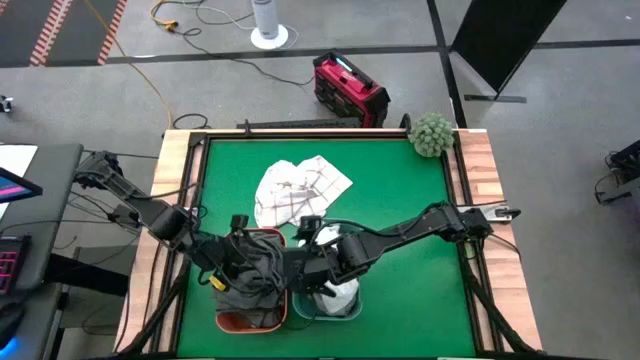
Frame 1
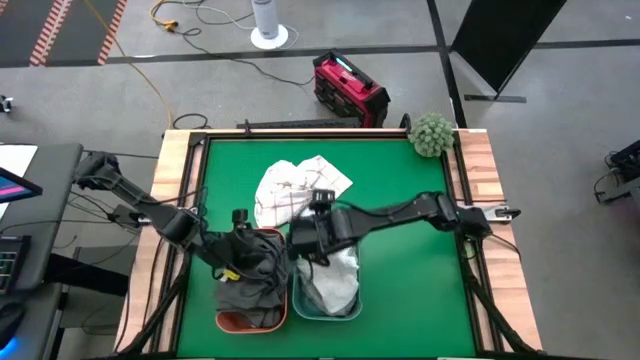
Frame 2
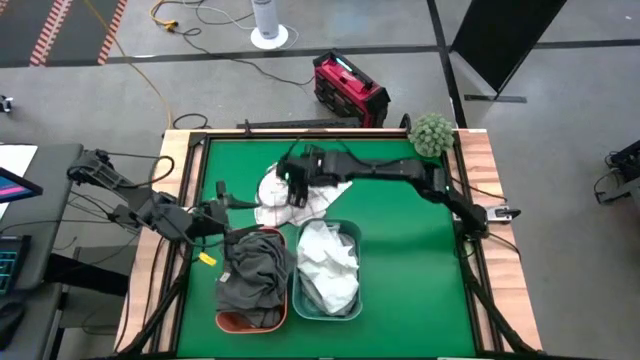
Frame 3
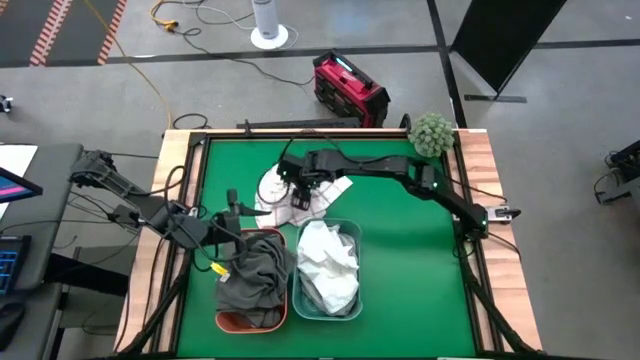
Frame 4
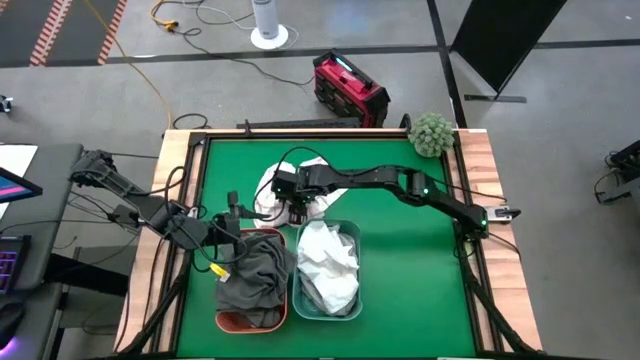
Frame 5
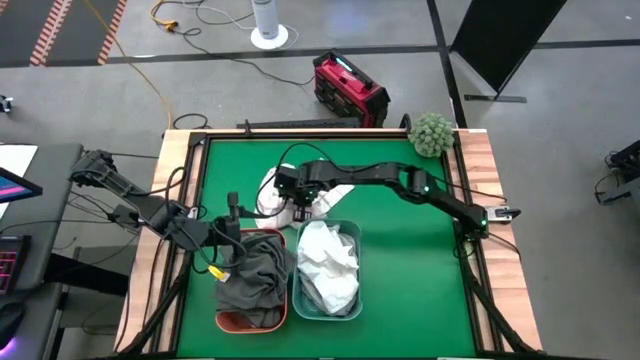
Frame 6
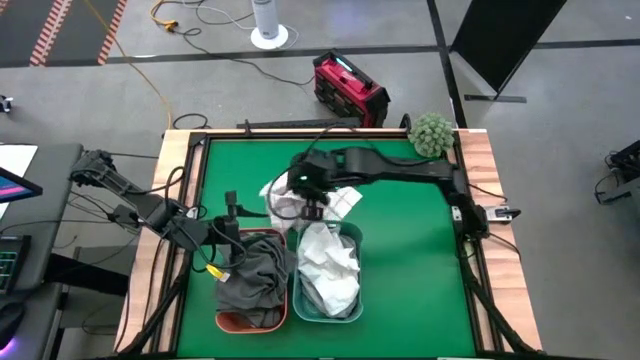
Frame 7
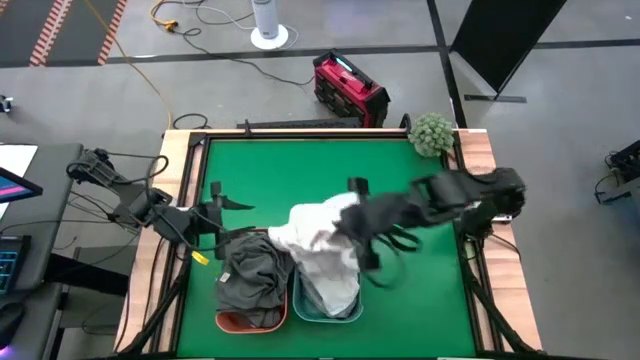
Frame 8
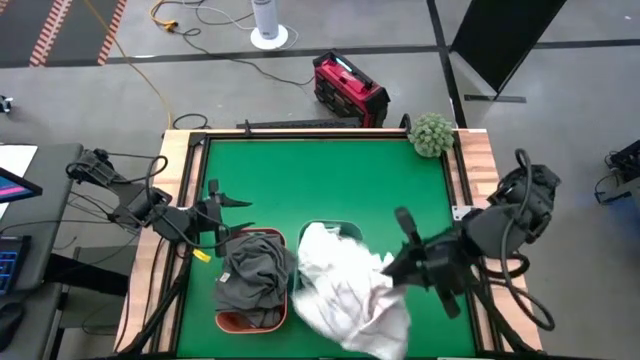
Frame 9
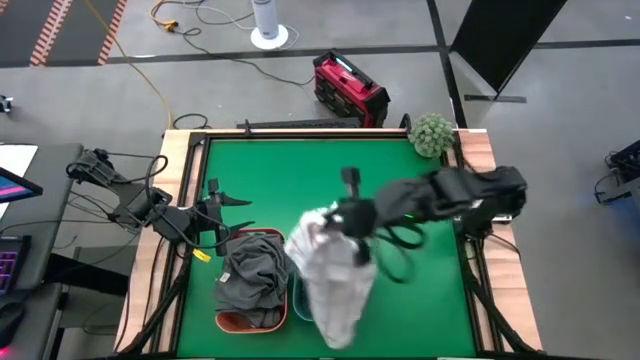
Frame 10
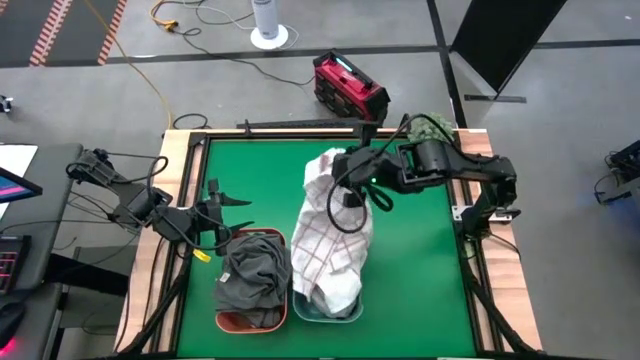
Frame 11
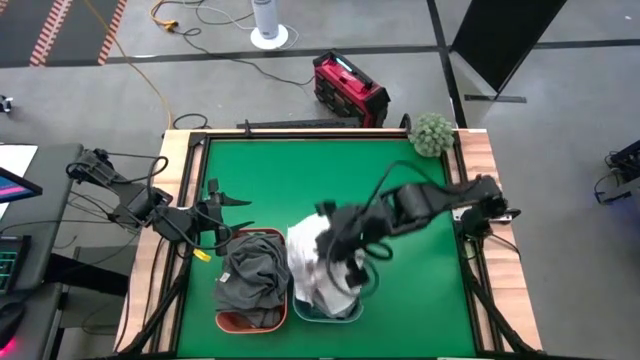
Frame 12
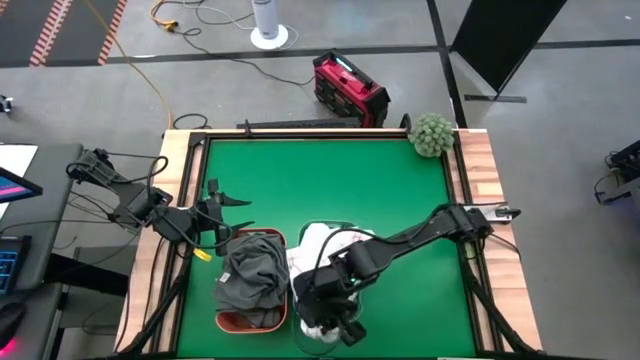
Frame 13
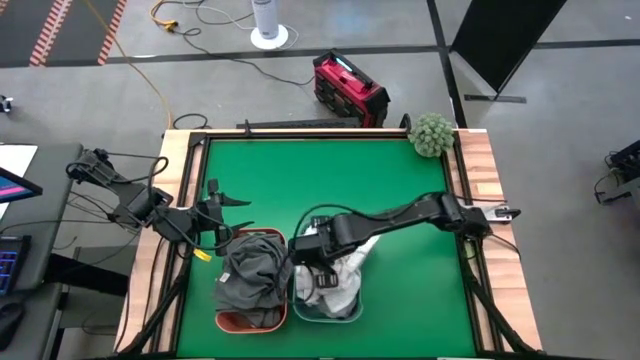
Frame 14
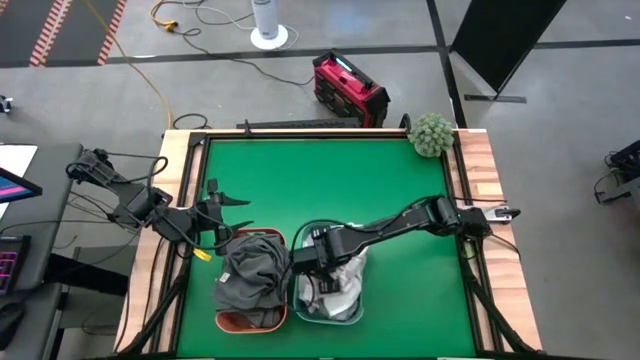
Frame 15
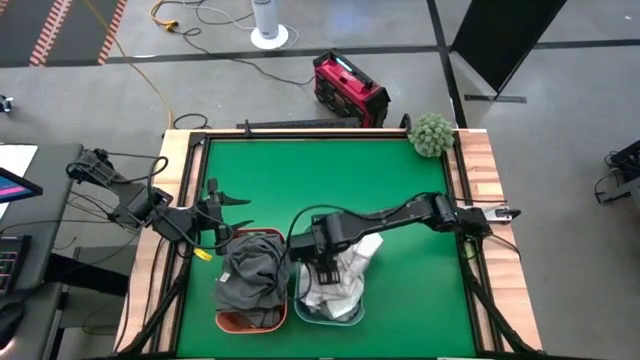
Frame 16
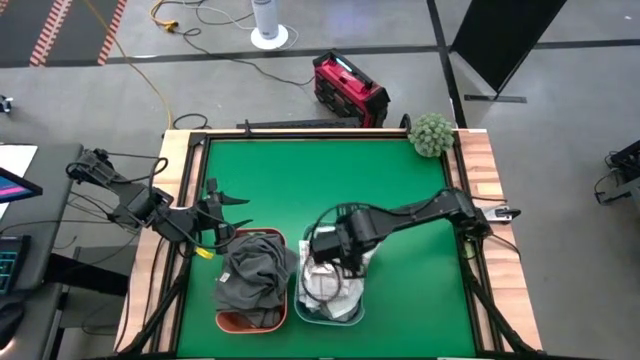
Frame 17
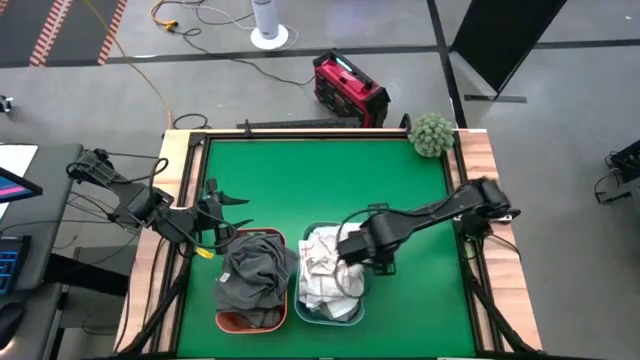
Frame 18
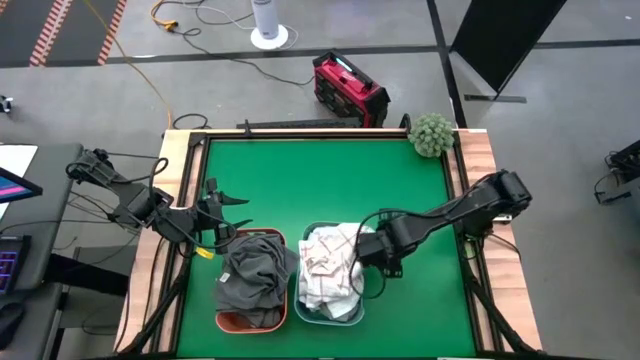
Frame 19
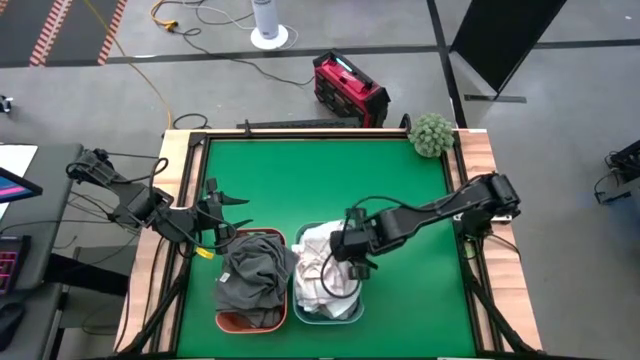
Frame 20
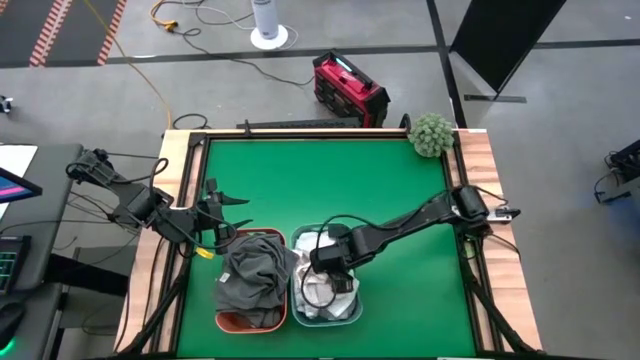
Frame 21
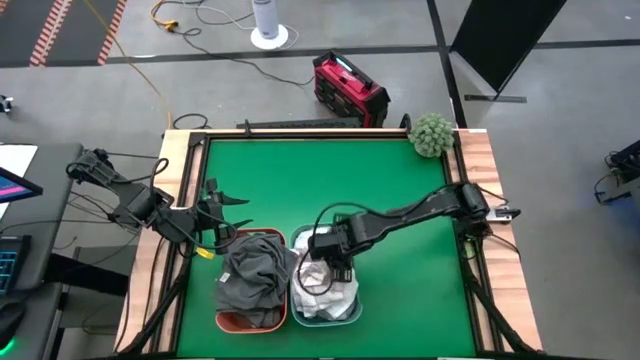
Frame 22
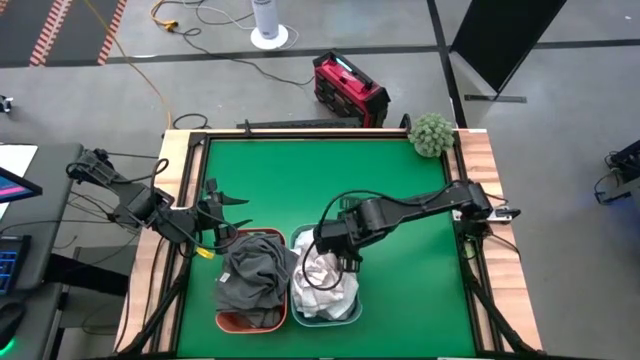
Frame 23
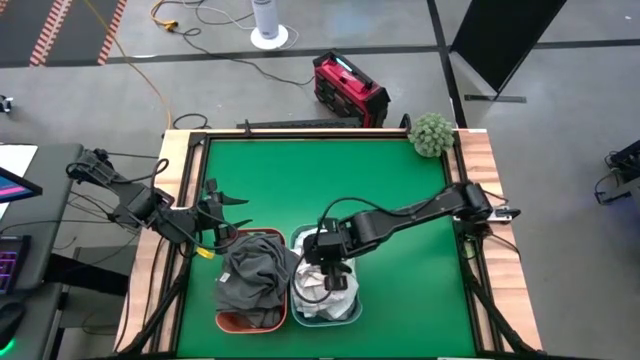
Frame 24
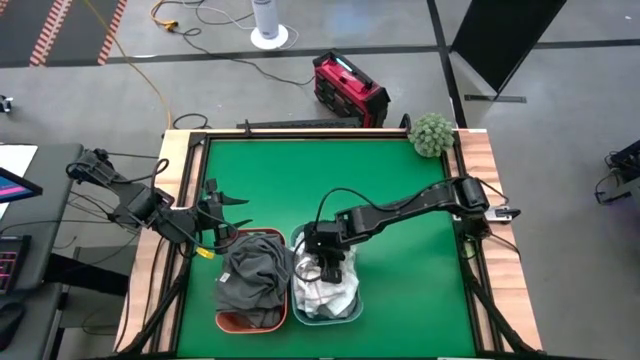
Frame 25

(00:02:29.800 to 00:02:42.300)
Task: Sort towels by color in basket
Put the white checkered towel into the green bin

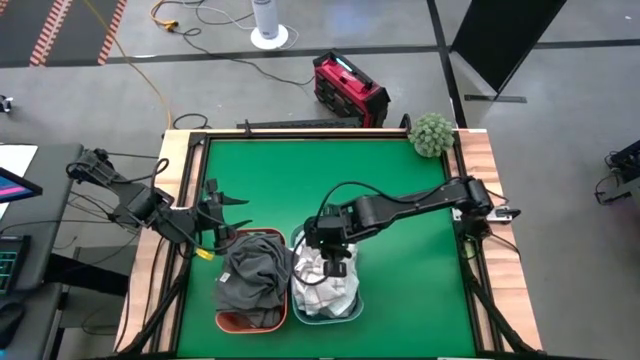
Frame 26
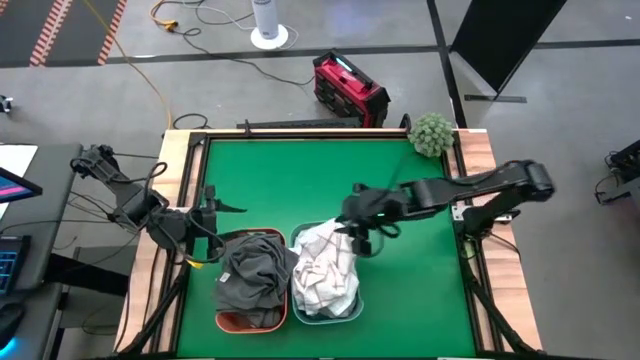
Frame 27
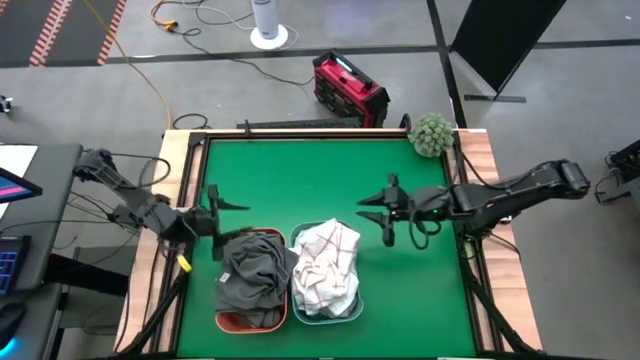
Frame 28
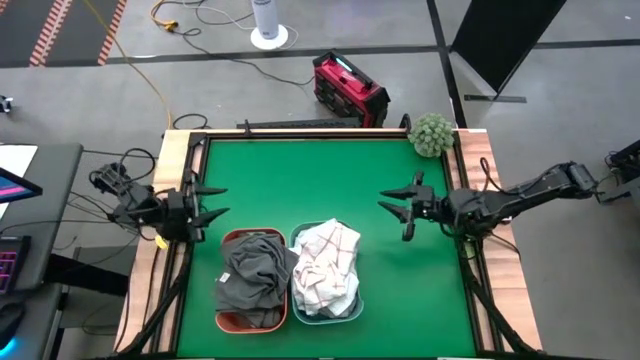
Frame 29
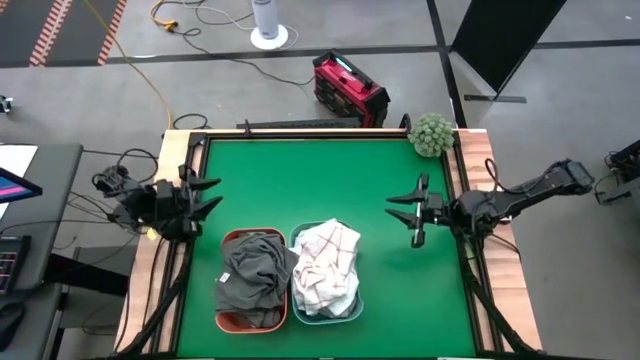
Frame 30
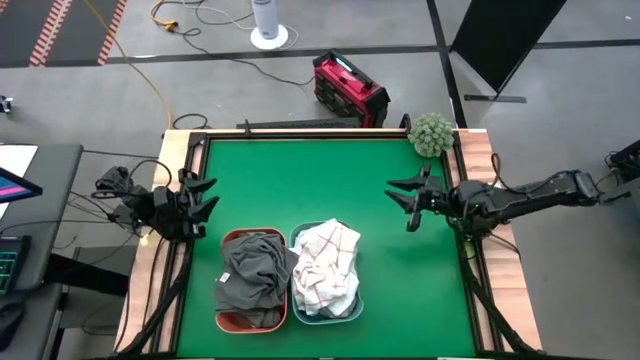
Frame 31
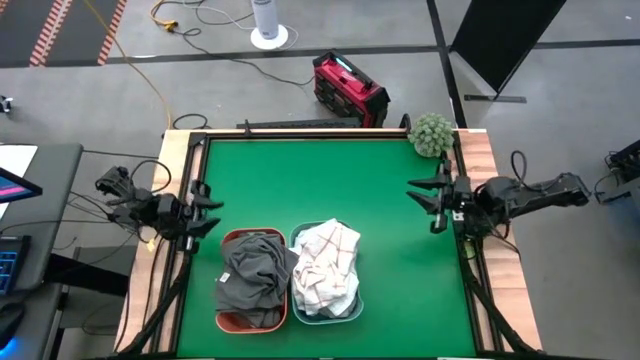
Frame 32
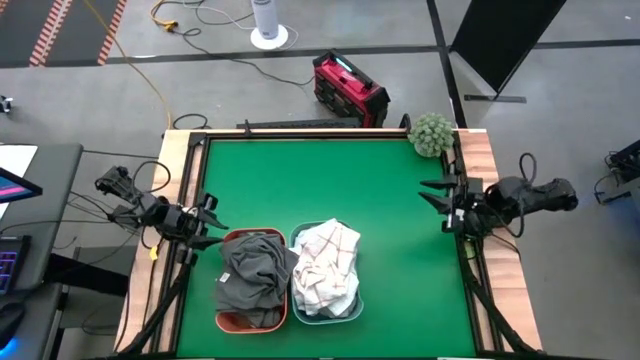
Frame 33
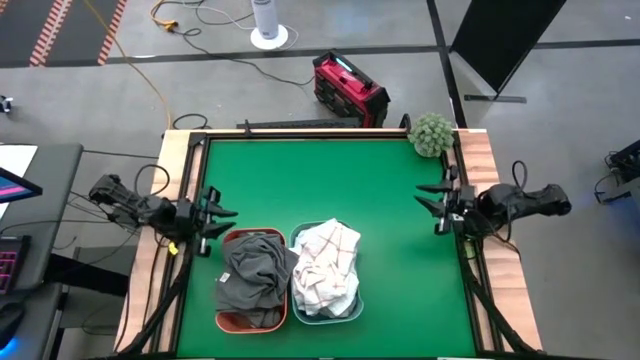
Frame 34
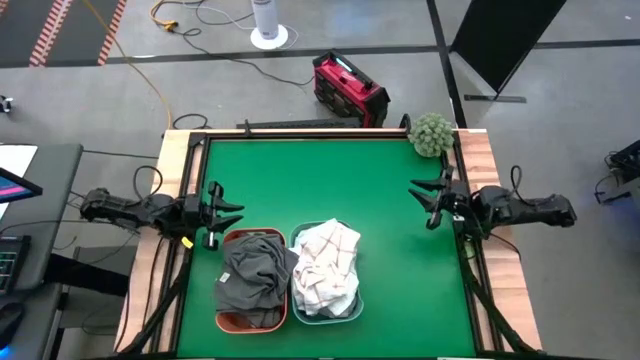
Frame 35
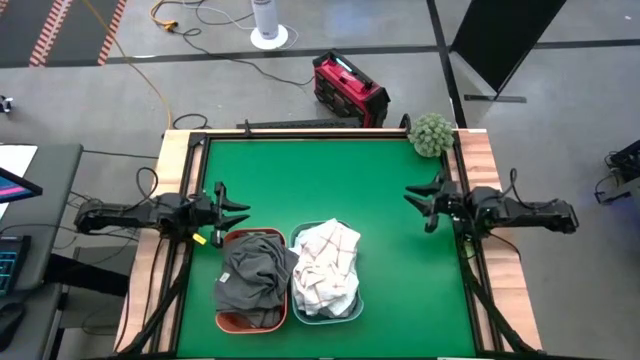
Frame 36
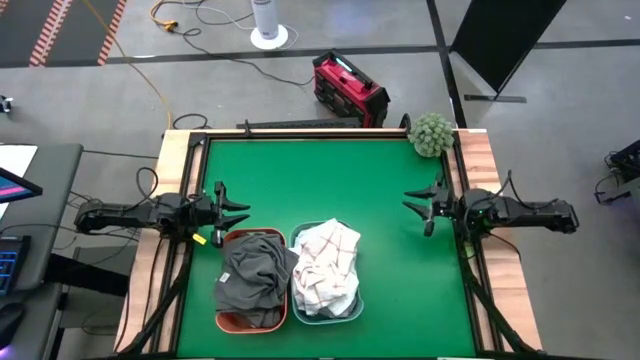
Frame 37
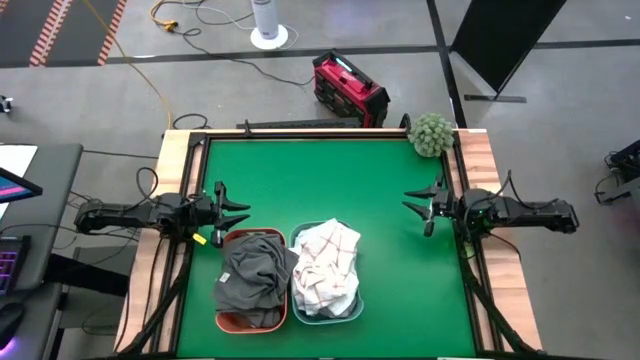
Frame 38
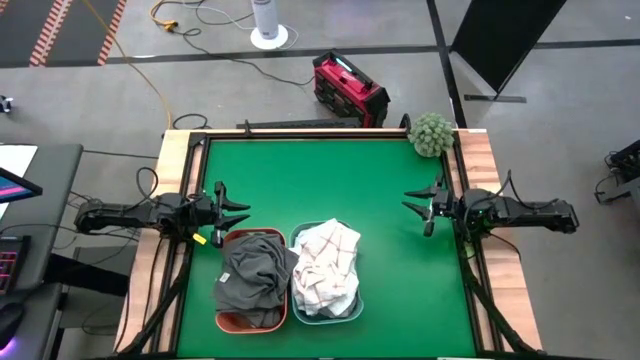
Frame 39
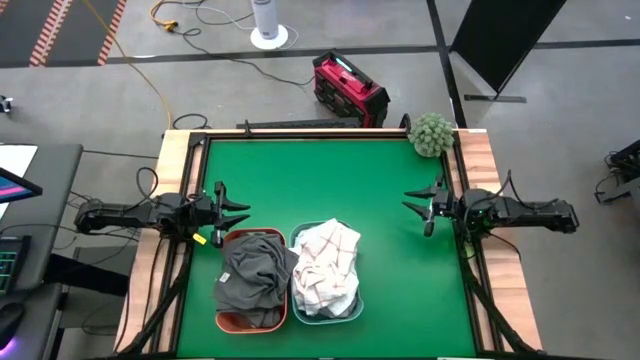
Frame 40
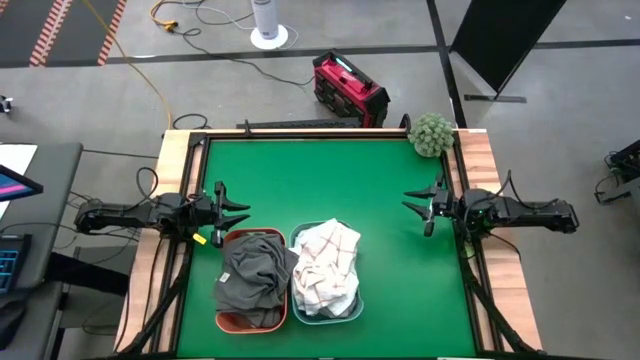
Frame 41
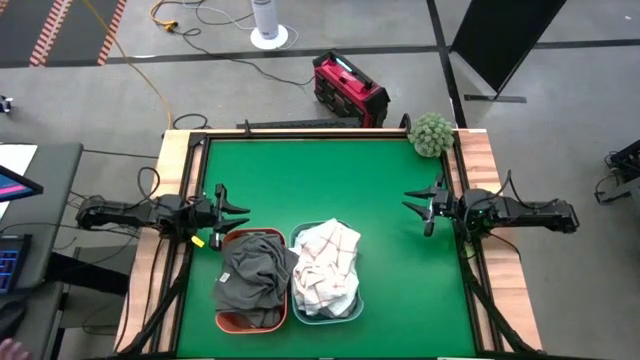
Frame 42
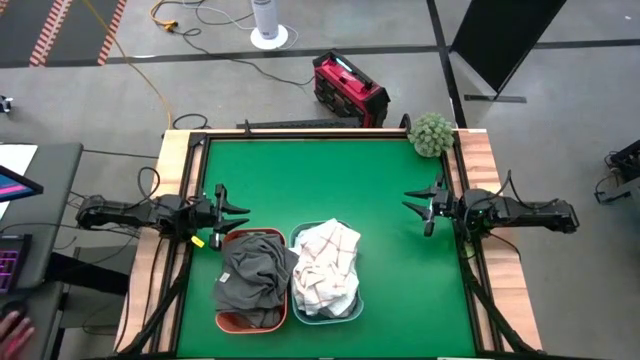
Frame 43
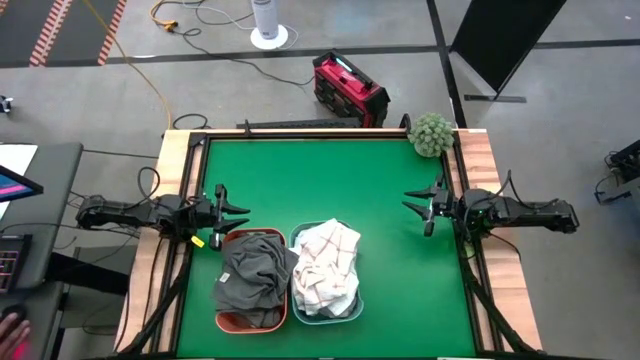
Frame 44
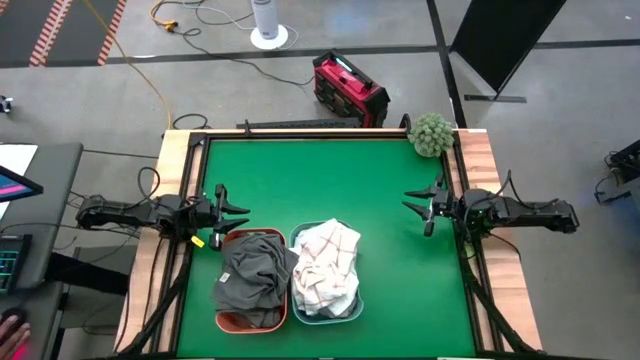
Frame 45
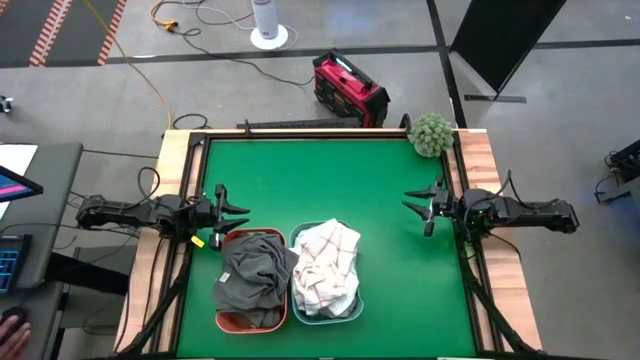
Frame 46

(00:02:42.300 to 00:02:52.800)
Return to Home Position
